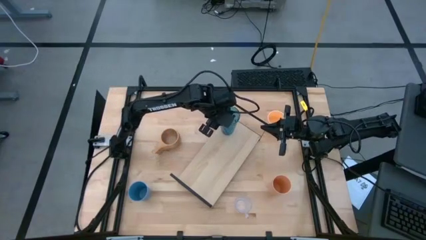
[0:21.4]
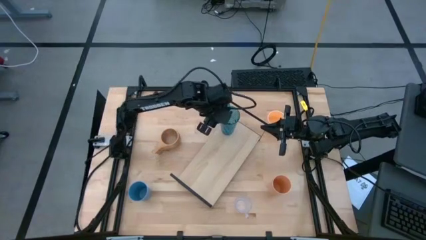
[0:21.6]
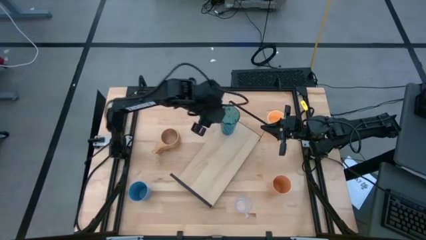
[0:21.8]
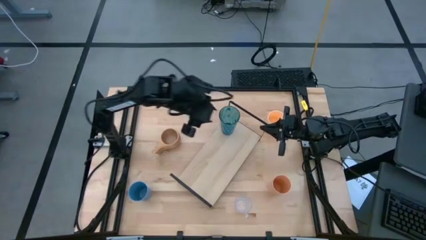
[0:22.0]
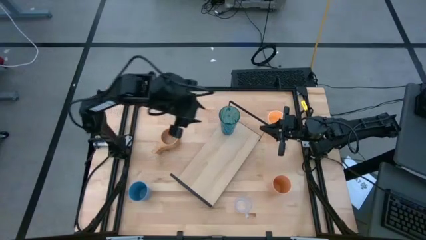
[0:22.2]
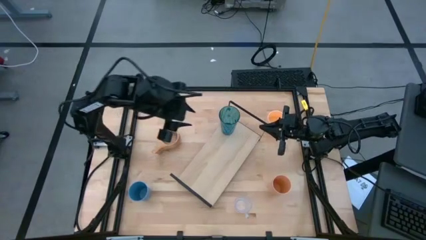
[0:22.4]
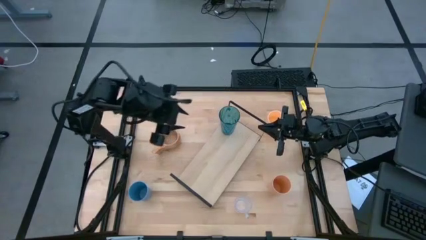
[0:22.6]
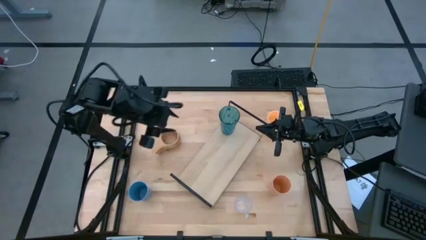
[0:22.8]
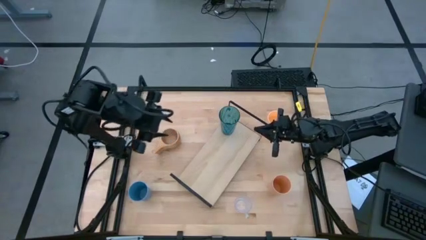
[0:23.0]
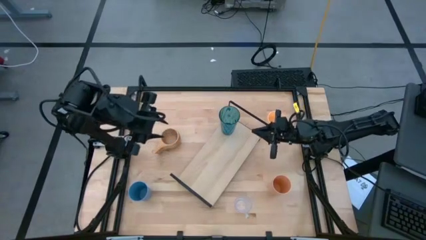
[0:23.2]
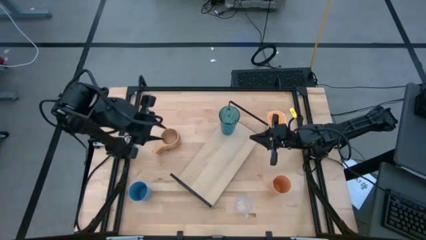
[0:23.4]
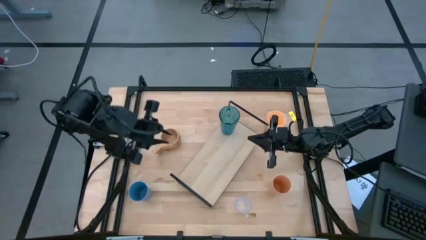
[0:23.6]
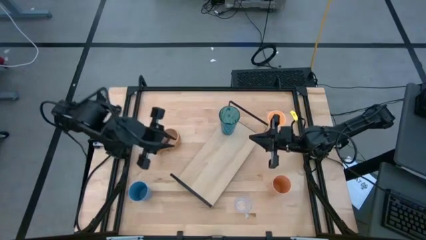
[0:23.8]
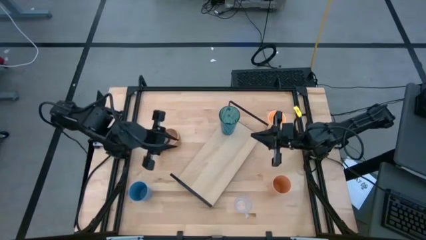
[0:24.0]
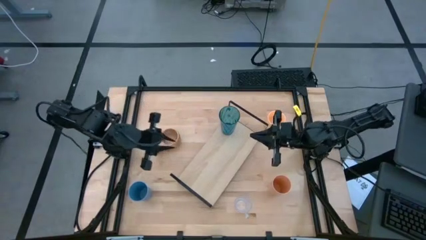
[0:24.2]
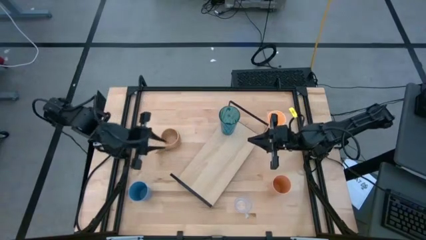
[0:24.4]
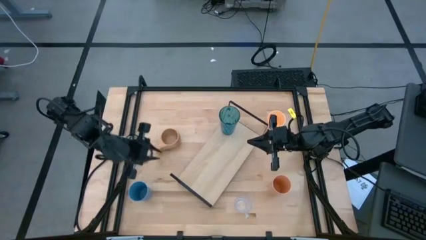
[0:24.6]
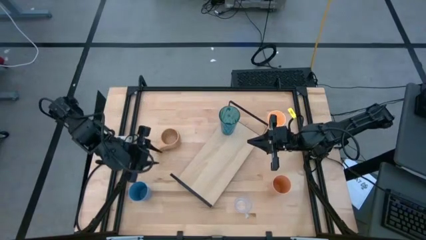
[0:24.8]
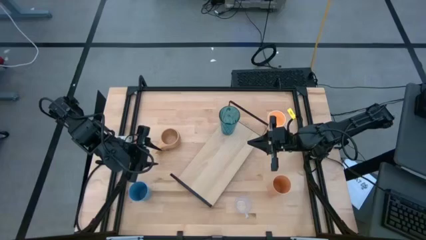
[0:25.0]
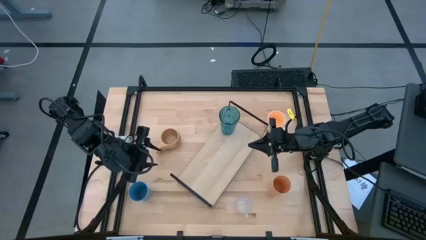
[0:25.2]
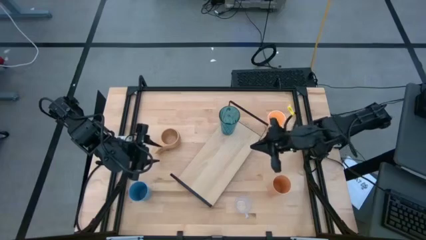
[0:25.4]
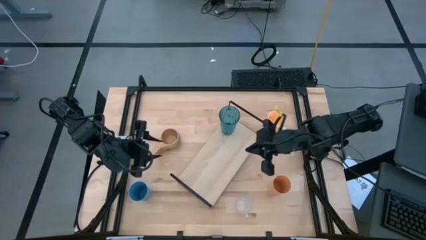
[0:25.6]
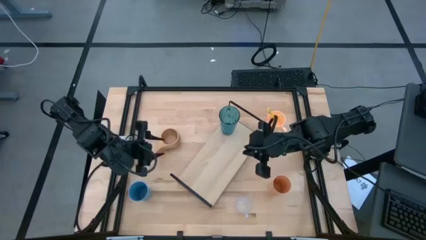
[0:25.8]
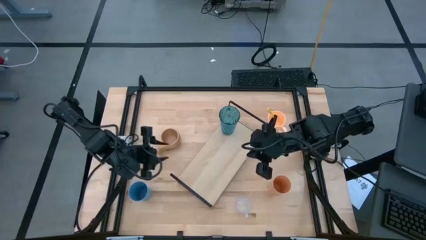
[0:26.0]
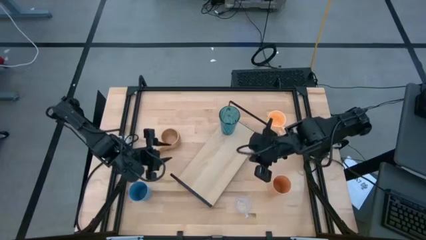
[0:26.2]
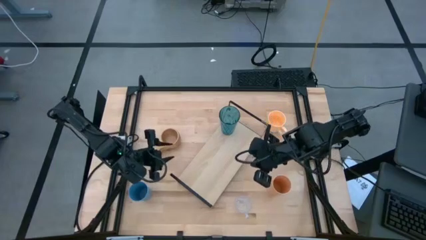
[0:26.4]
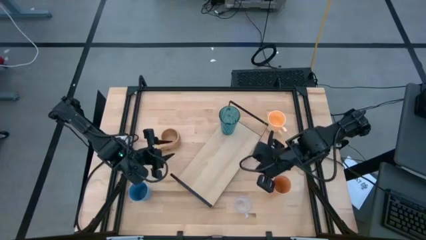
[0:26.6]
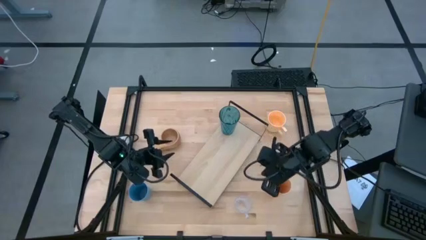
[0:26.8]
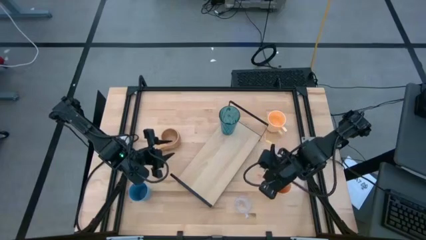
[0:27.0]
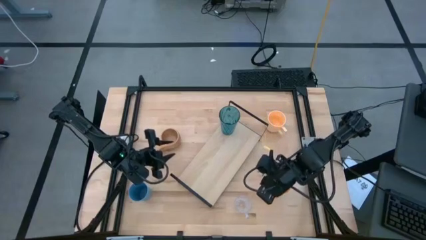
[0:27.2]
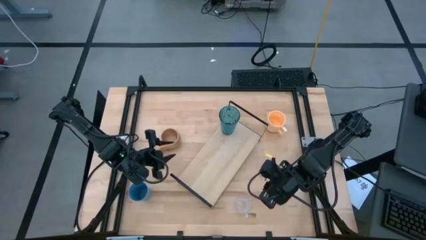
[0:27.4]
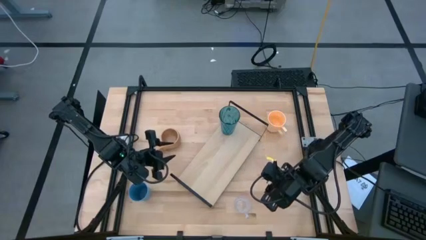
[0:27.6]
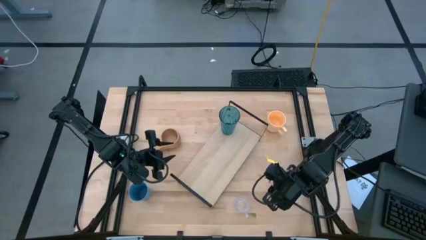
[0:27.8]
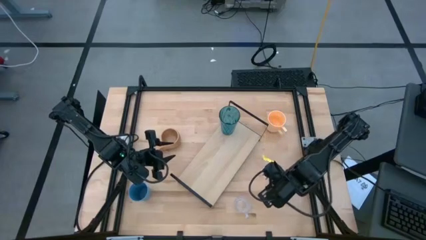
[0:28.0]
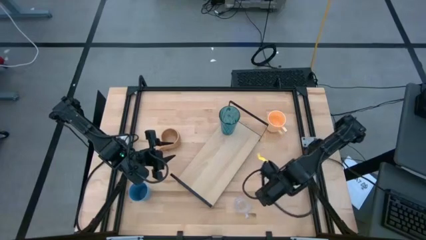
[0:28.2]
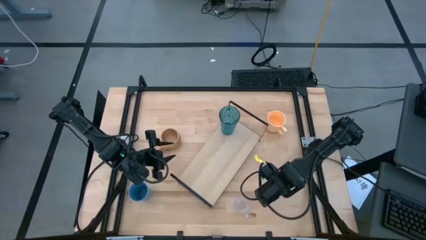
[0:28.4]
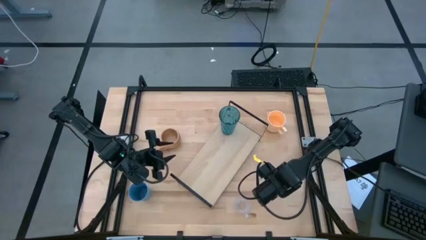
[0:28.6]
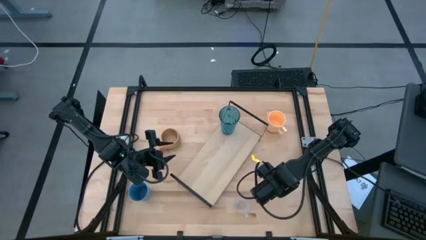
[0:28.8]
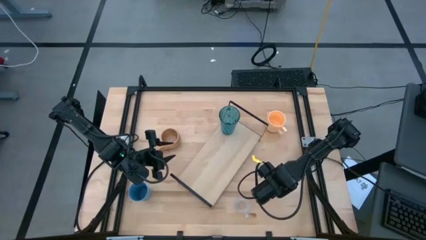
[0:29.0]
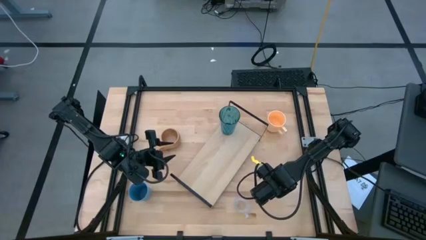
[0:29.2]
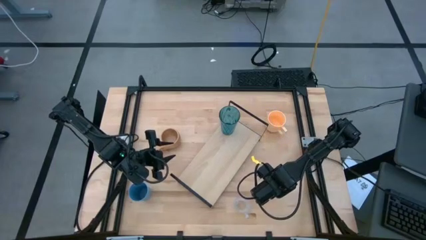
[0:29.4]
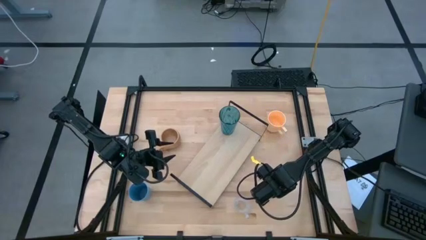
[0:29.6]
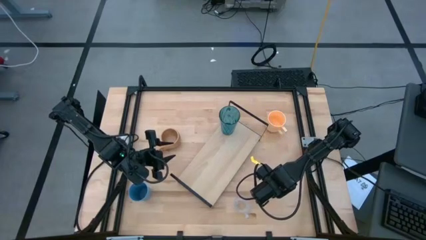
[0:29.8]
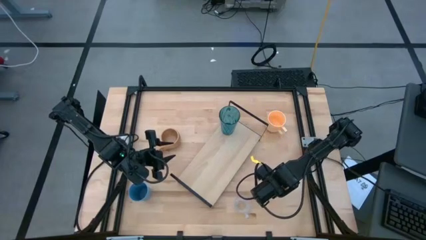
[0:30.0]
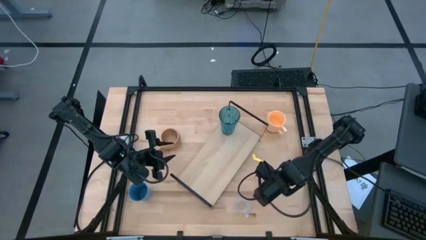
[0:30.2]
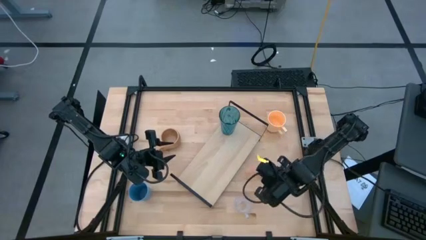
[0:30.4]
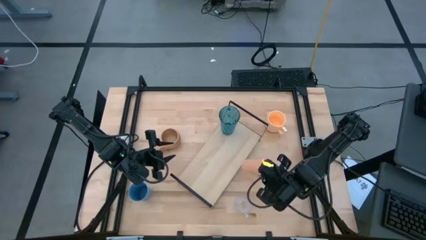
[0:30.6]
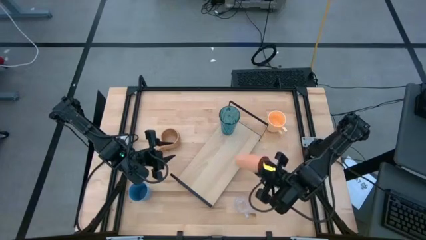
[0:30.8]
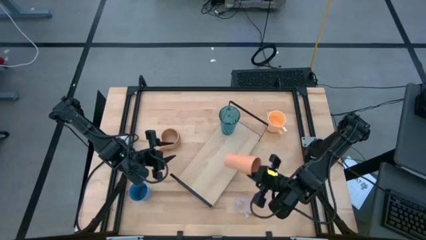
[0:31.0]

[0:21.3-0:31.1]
Task: Stack small to large cups/mugs on shelf
Put the orange cup on the shelf

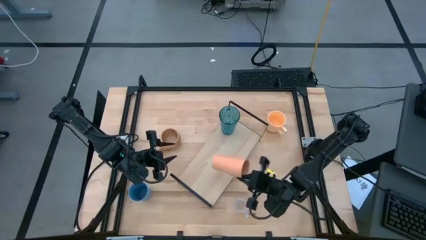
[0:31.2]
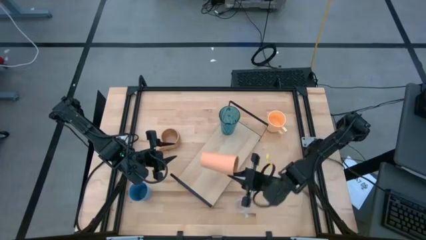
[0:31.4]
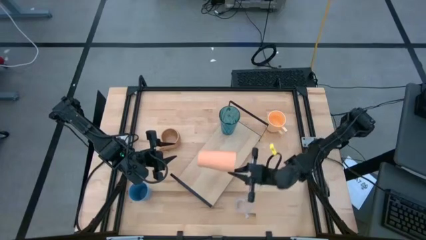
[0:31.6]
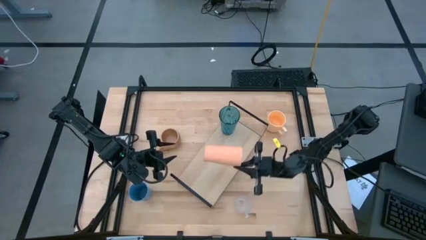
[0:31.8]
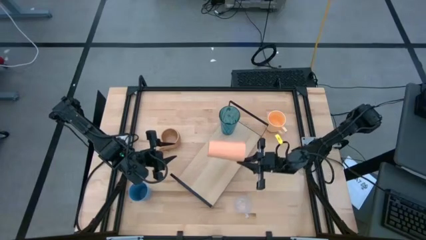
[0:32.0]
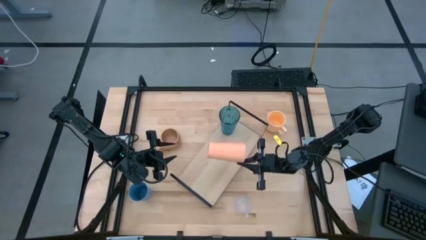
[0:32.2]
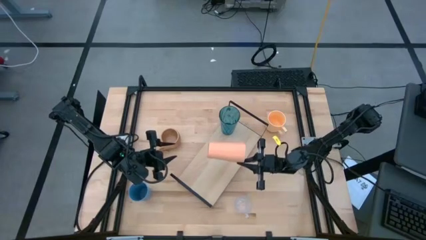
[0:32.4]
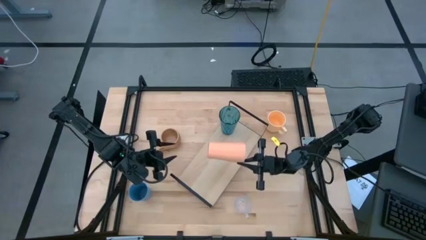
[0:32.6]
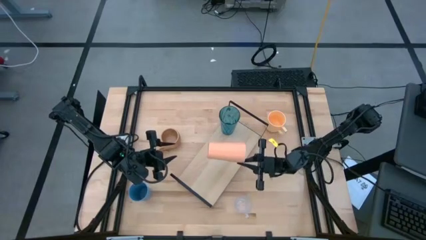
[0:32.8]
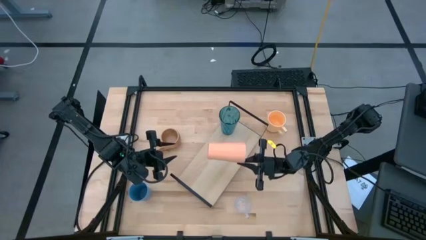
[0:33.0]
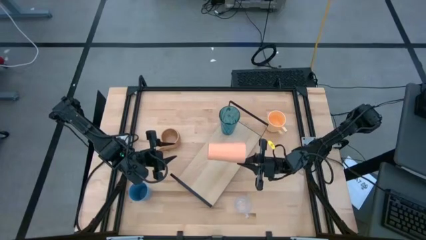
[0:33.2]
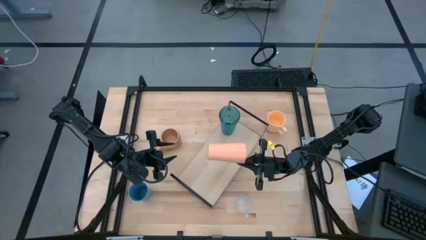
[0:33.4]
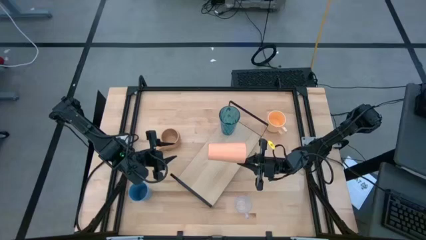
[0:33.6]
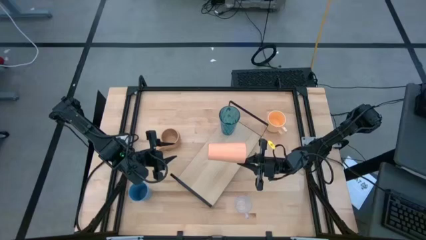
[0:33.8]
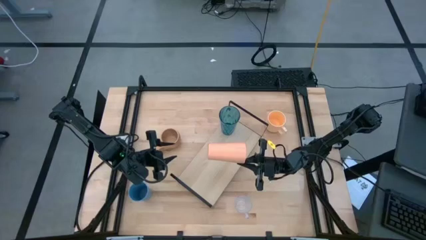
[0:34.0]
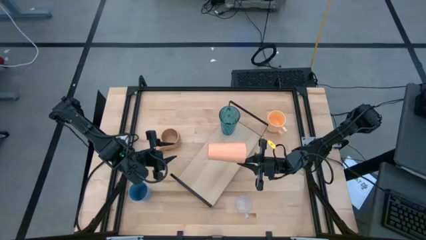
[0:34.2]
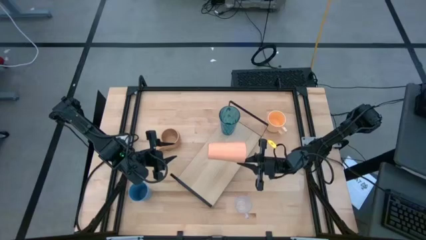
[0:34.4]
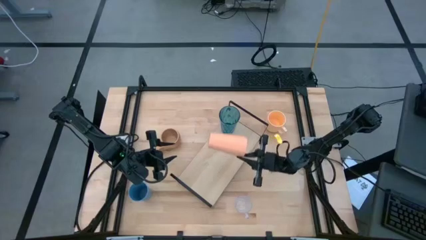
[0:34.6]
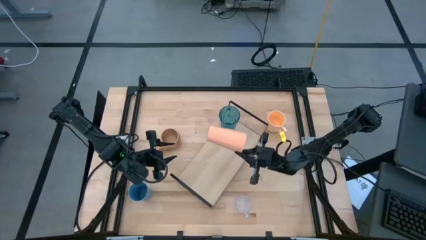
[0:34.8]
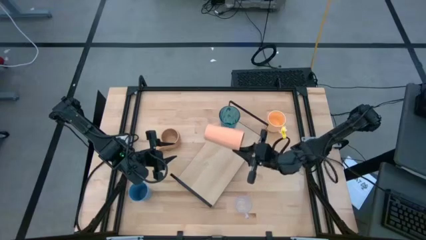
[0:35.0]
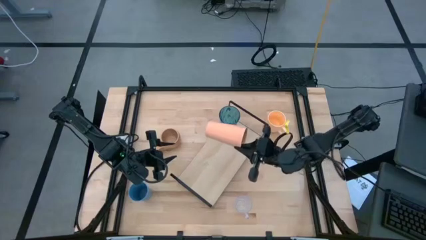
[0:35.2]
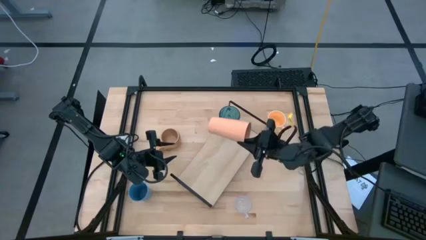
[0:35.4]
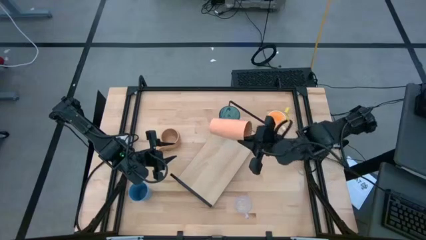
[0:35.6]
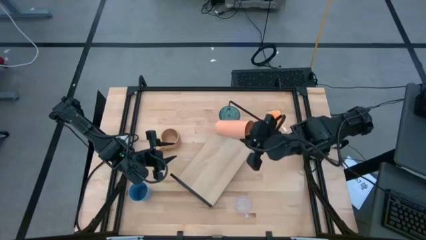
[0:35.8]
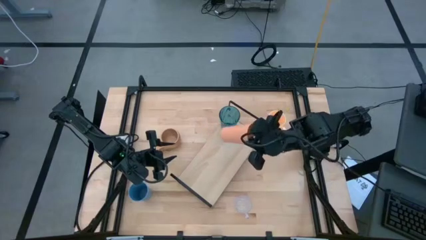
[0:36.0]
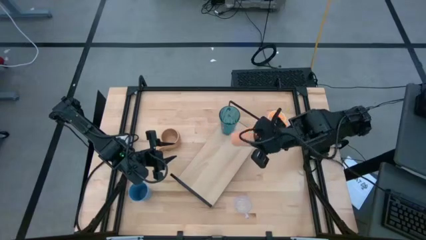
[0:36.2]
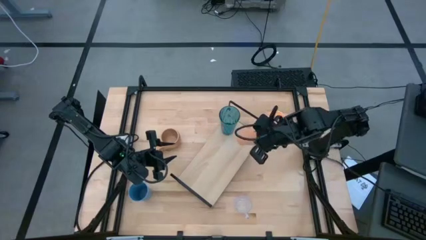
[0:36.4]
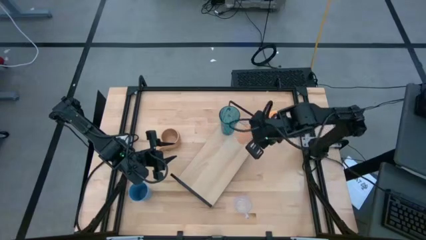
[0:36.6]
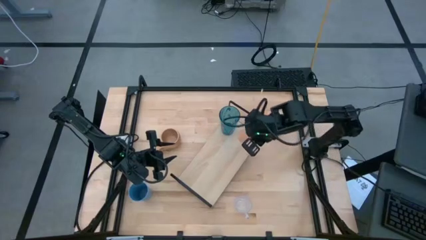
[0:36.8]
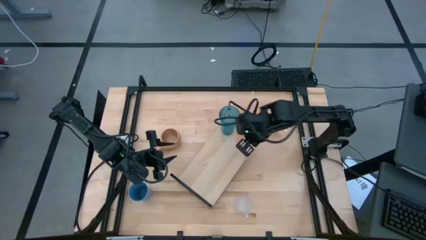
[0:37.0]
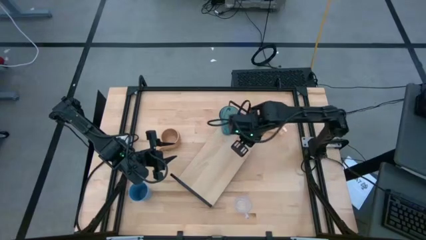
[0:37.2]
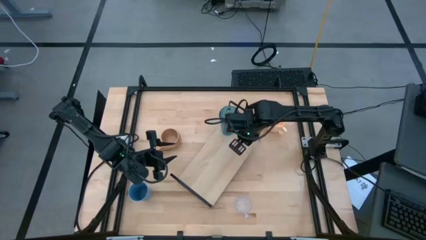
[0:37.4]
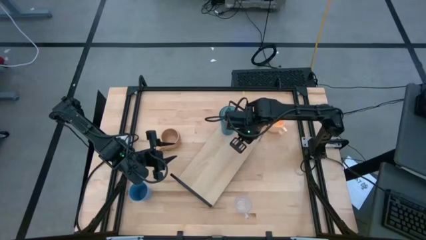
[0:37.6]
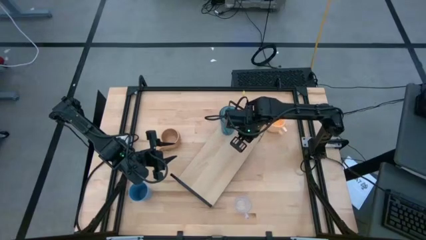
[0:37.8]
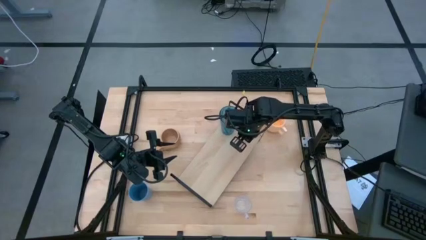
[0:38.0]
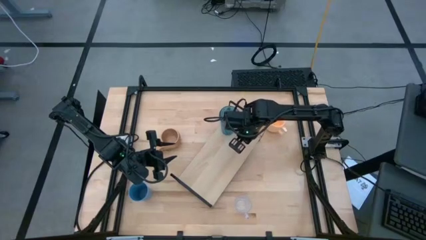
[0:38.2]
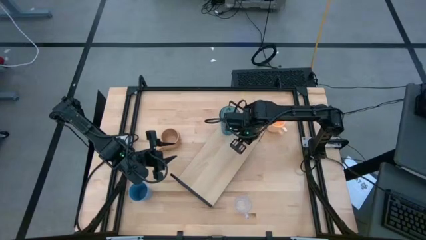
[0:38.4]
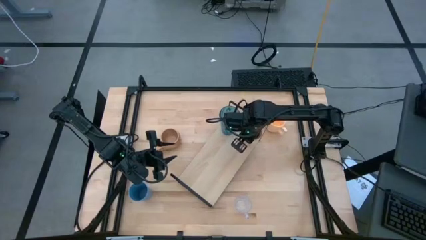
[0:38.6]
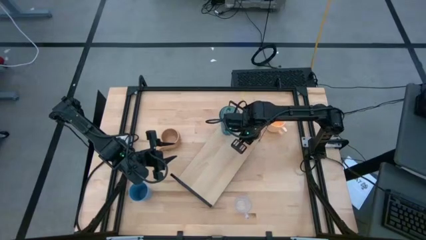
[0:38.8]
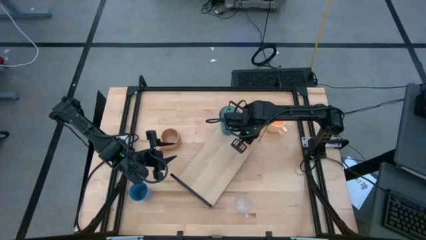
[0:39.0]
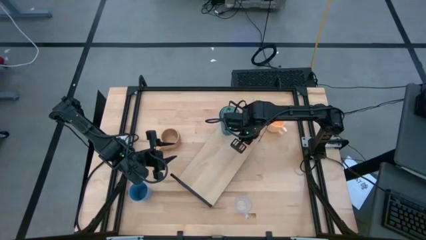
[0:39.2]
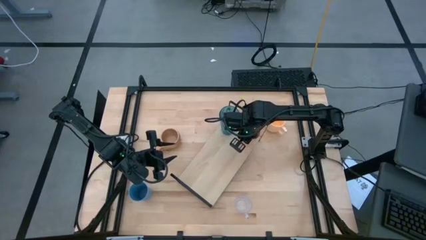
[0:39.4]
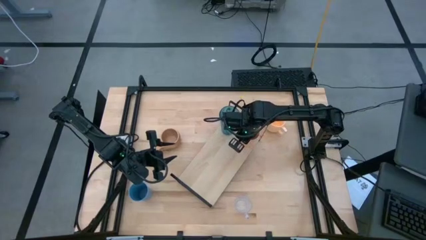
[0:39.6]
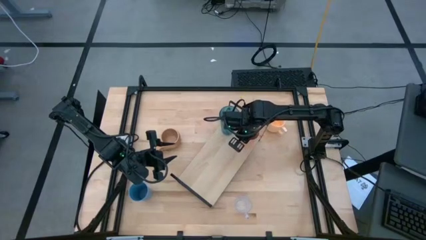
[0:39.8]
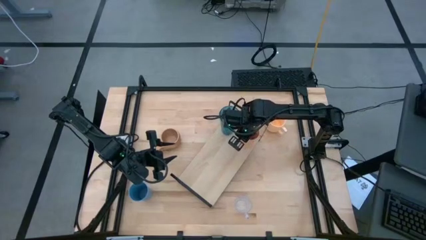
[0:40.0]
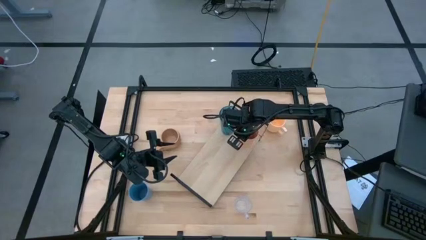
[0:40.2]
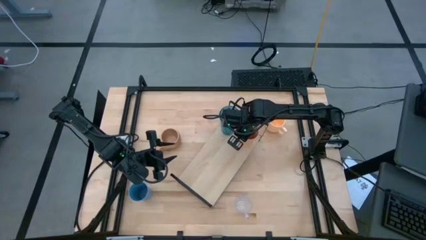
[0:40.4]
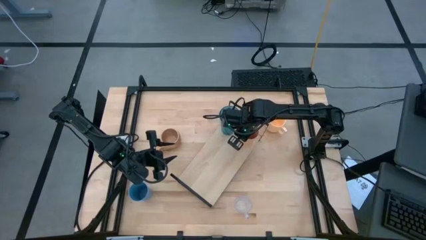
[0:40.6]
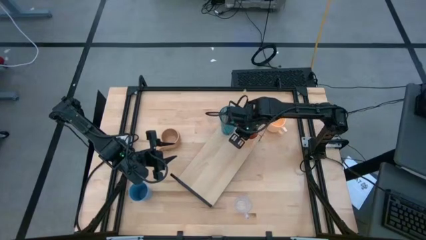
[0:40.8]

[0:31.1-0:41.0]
Put the orange cup on the shelf
